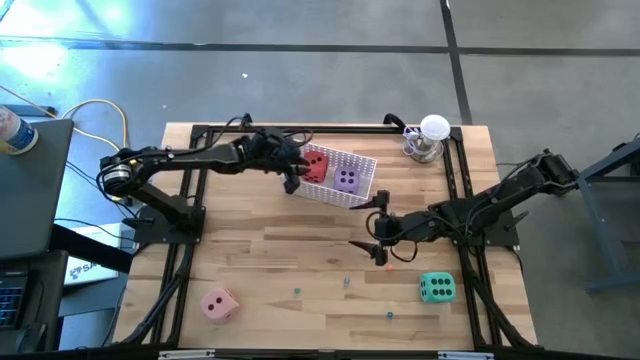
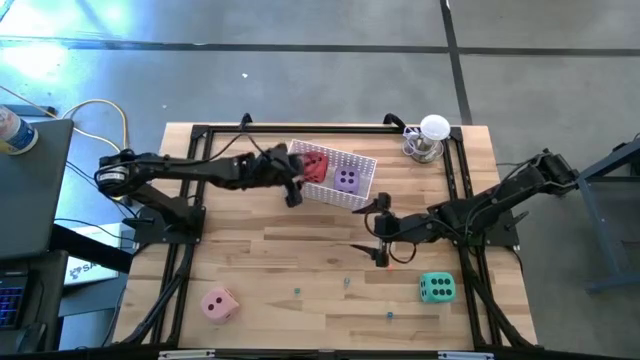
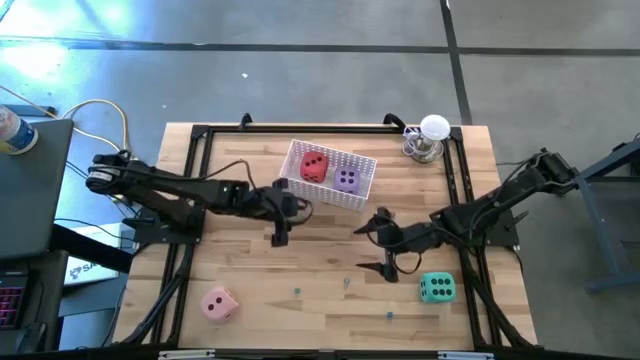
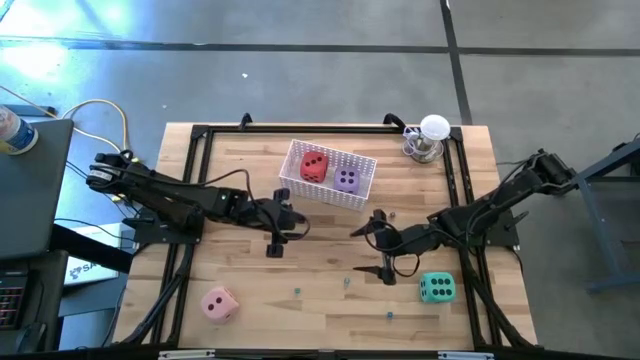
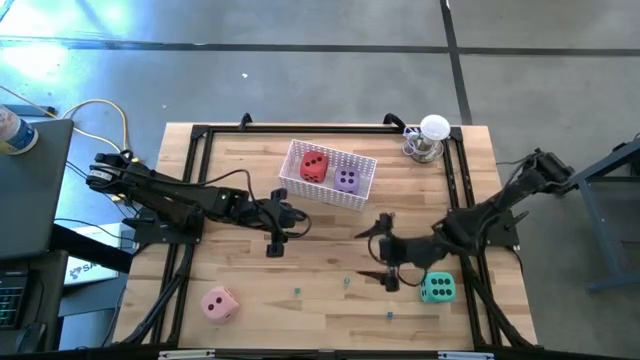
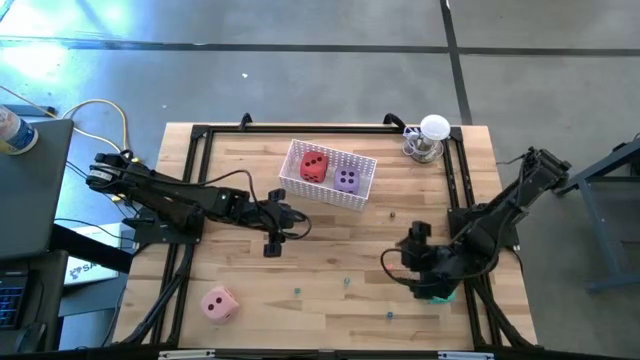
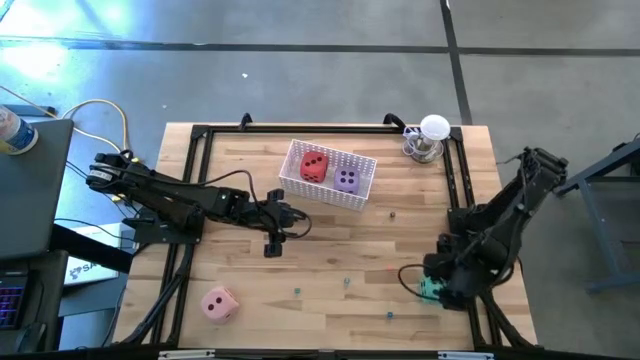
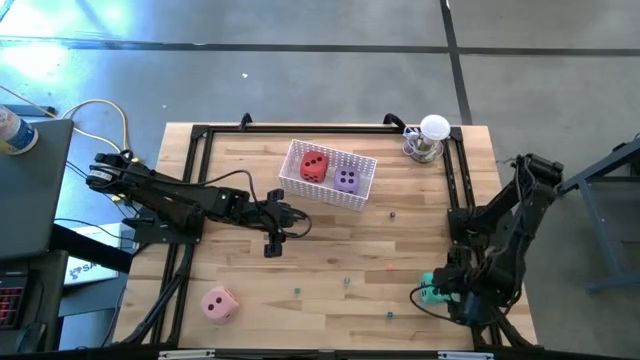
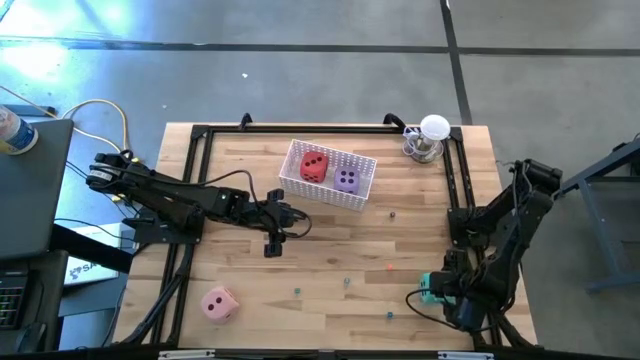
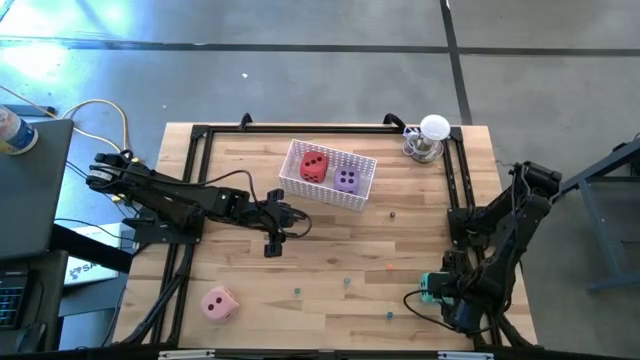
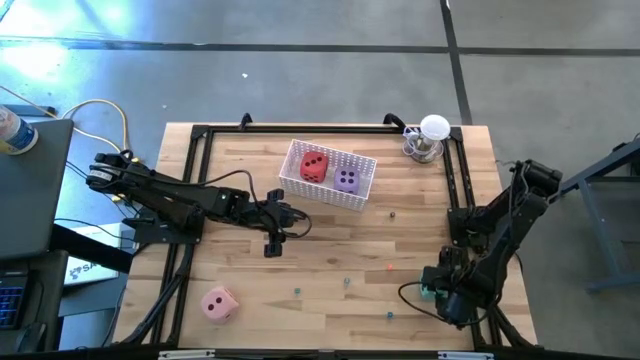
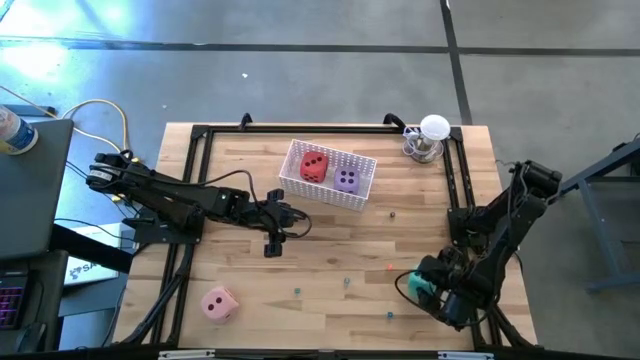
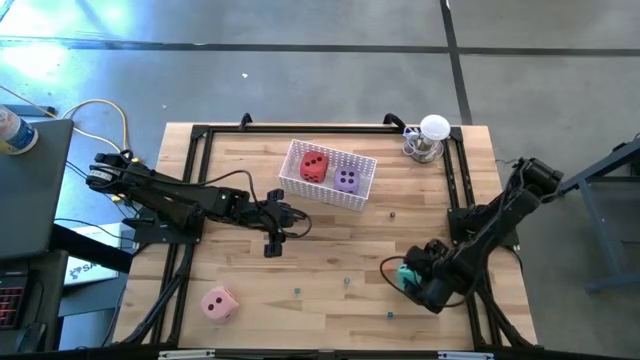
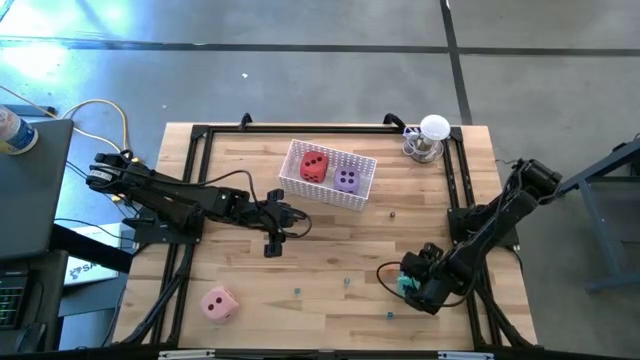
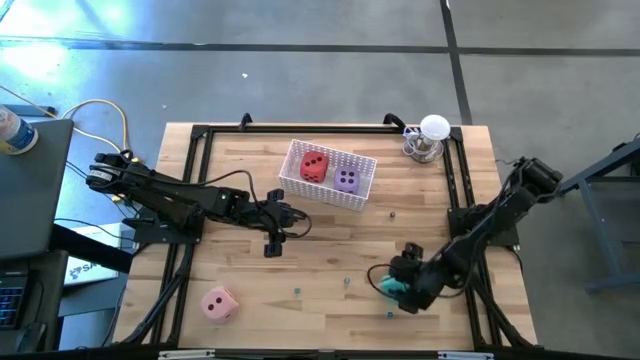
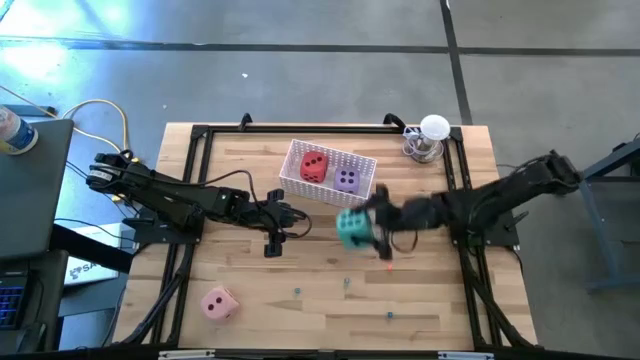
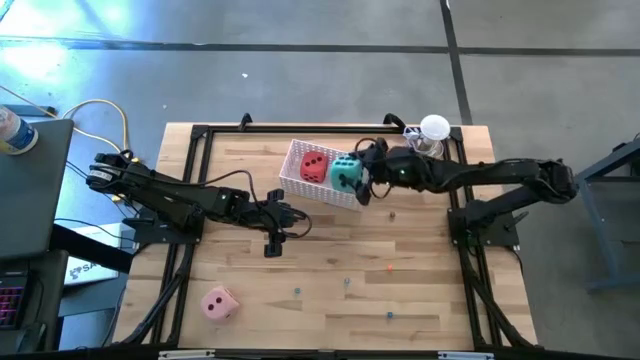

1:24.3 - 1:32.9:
Task: Pick & Place Dice
Put the big light green die into the white bin

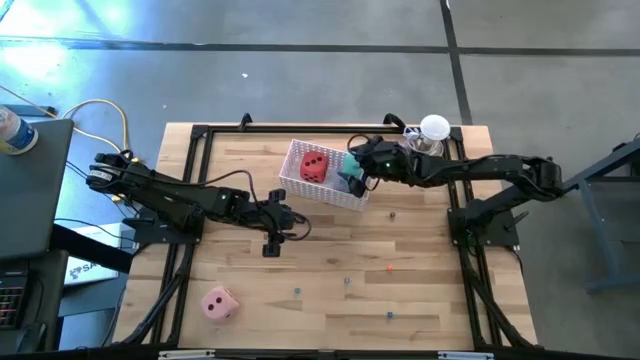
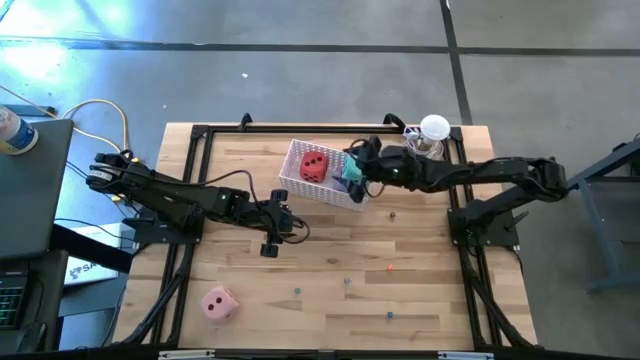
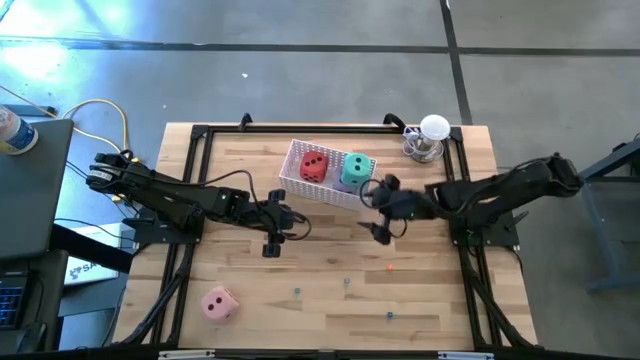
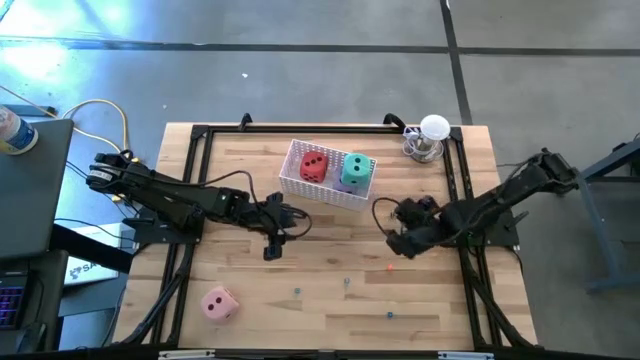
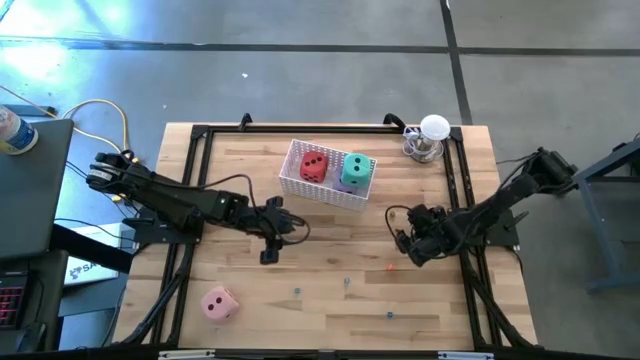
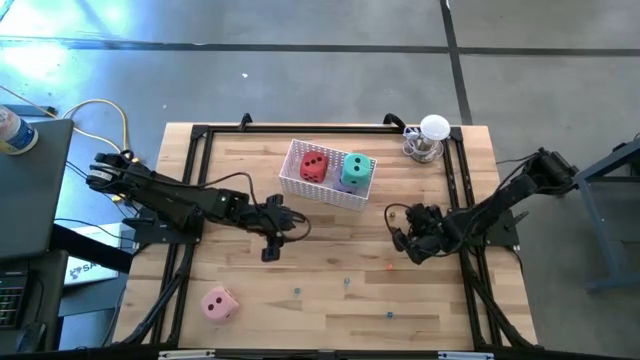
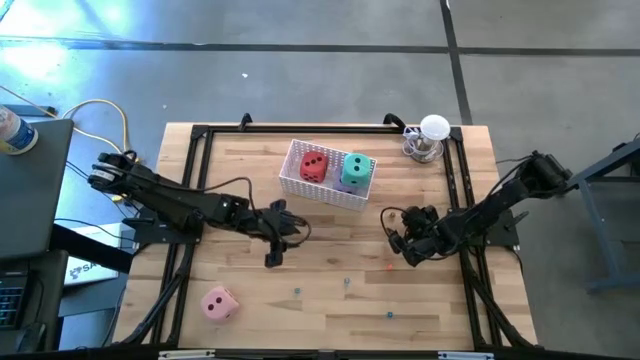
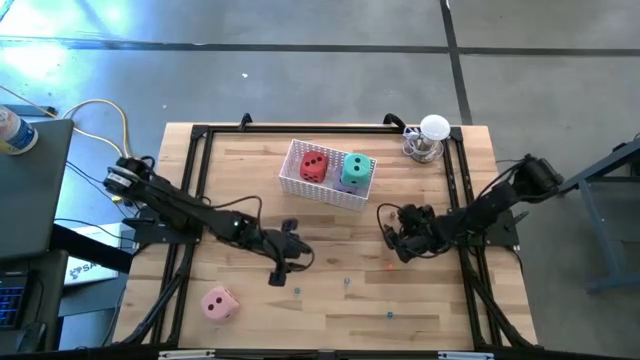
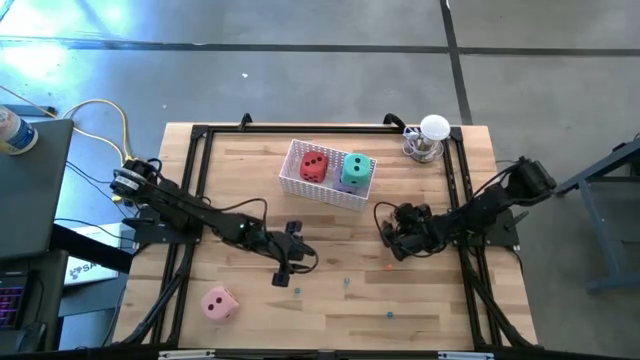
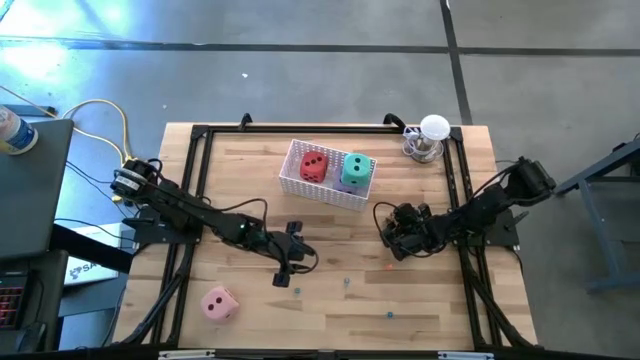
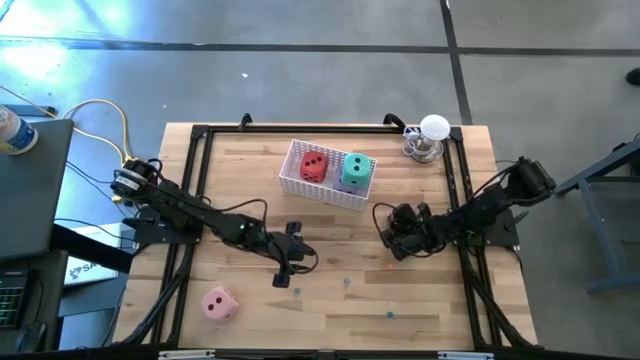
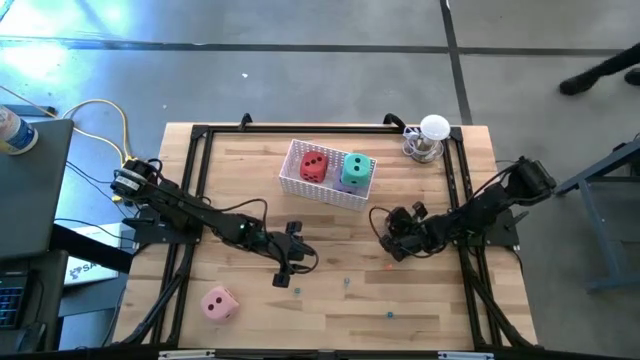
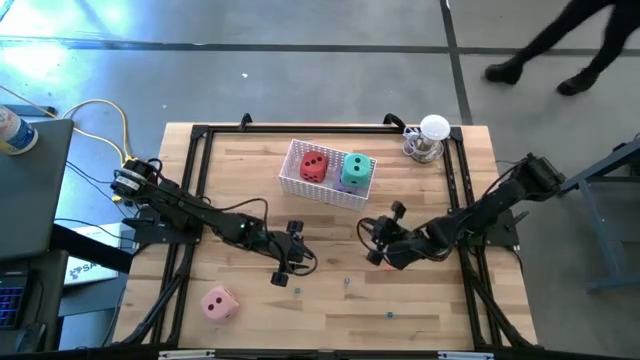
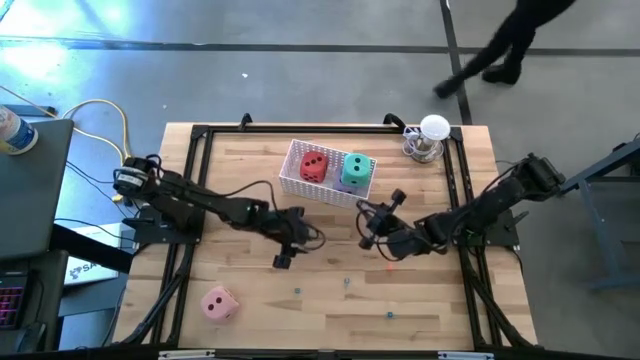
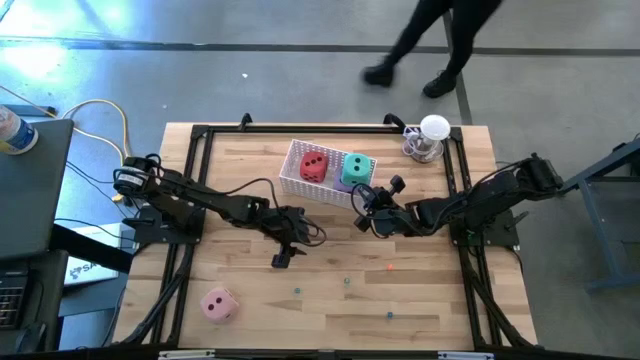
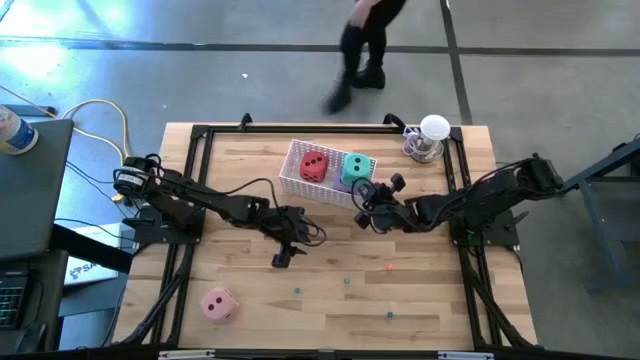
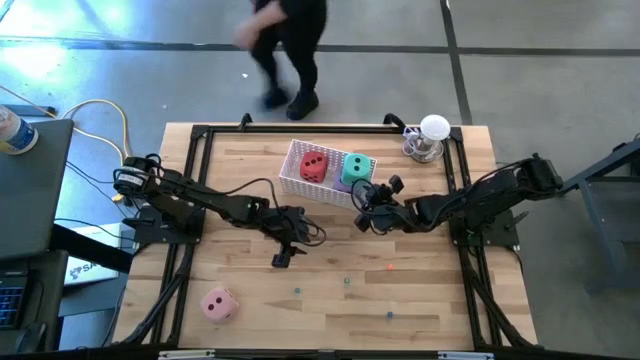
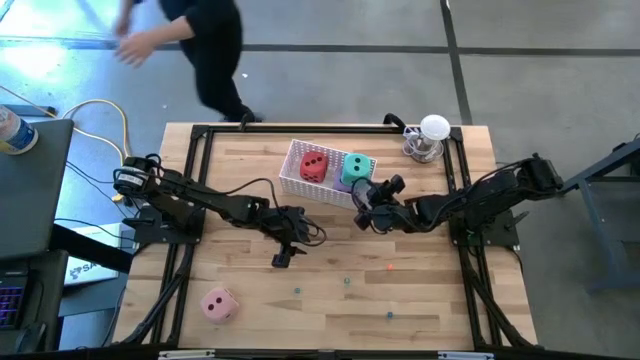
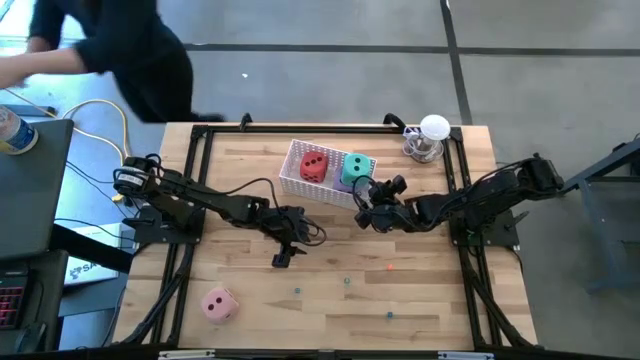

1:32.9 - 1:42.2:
Put the small black die into the white bin

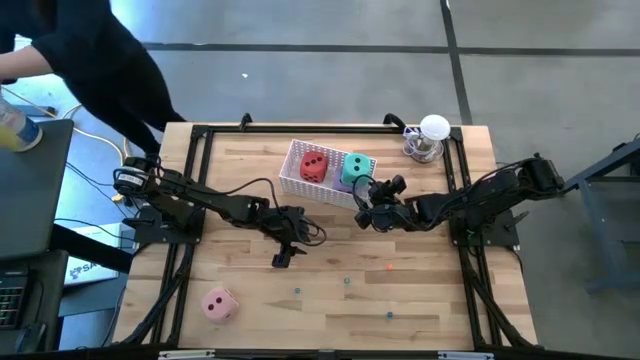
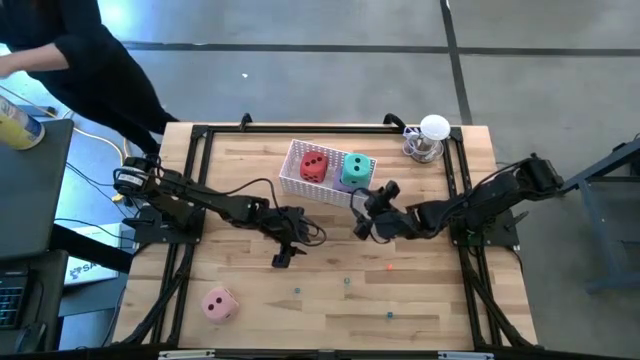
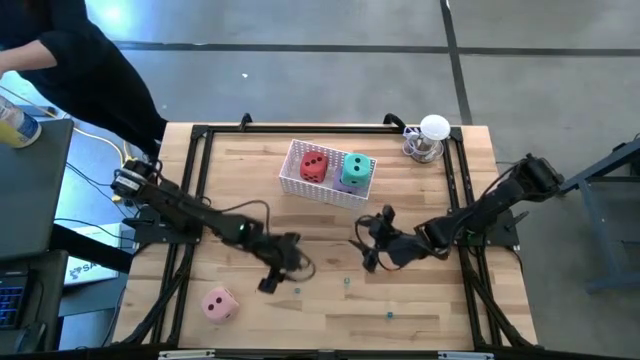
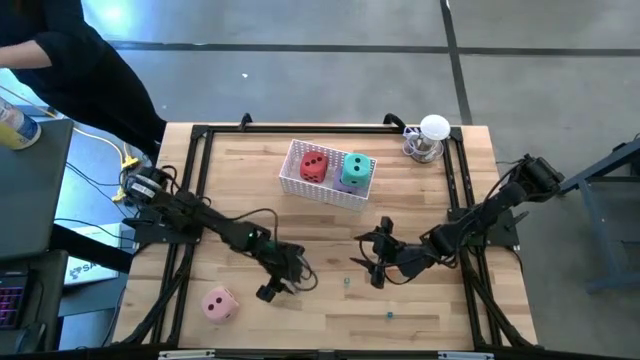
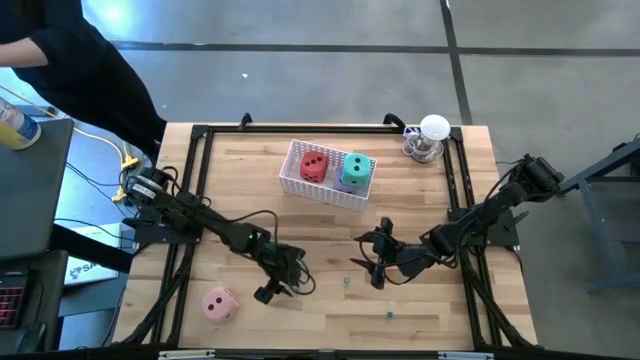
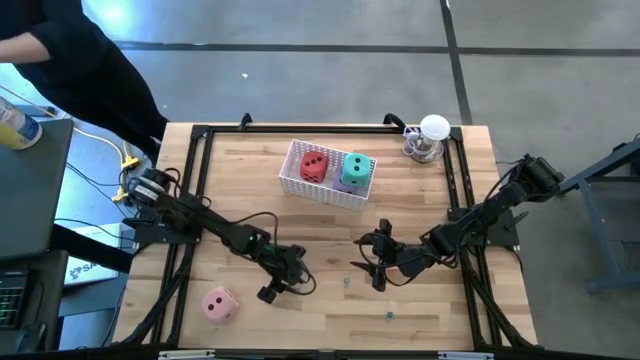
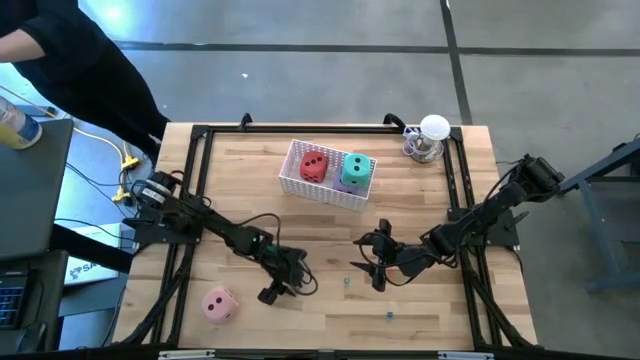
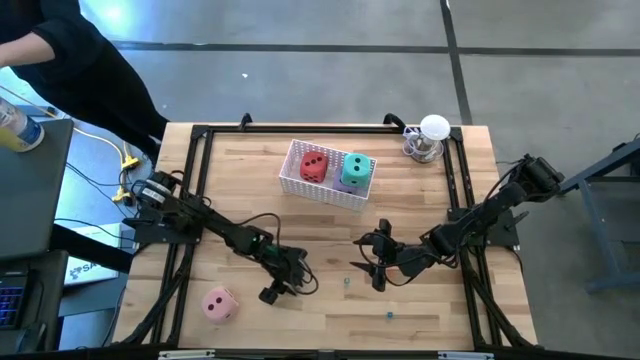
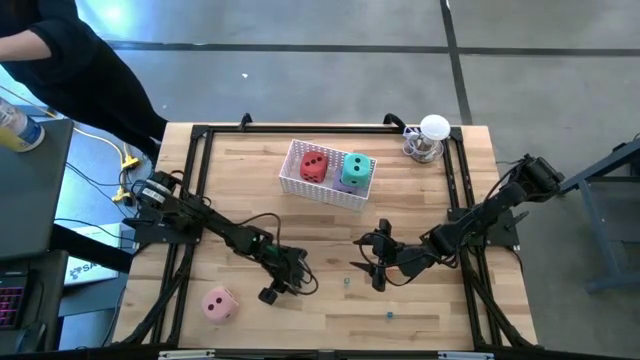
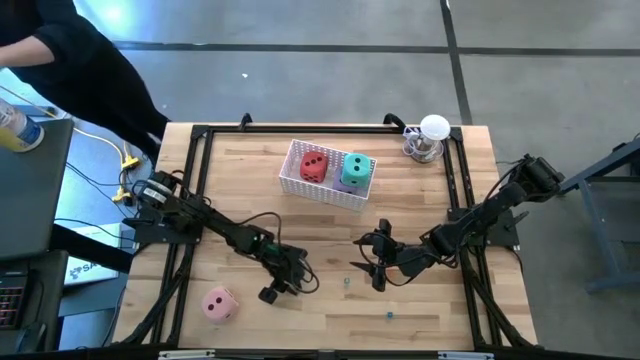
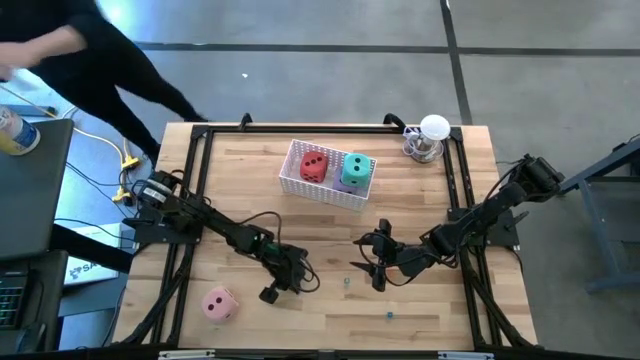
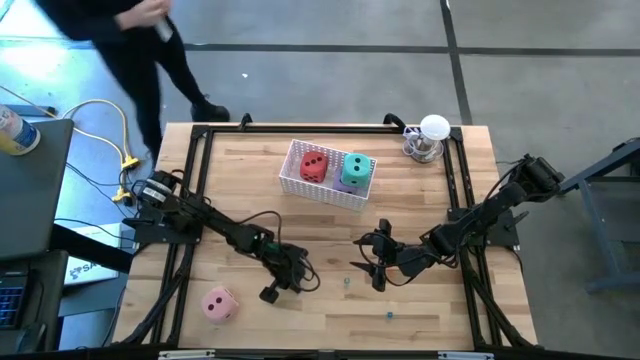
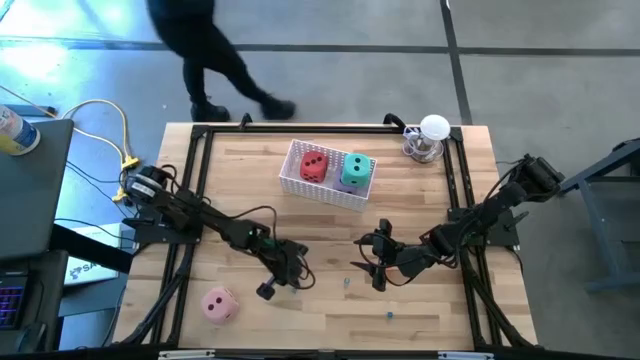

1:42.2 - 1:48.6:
Put the small light blue die into the white bin
